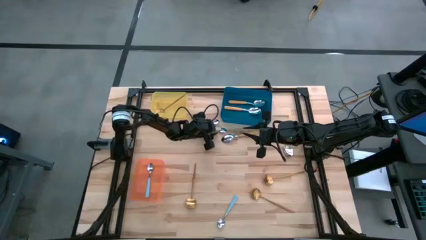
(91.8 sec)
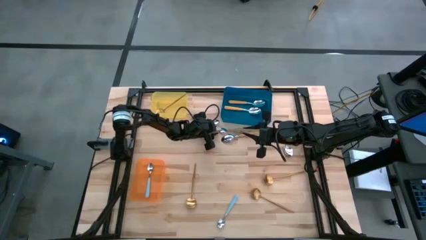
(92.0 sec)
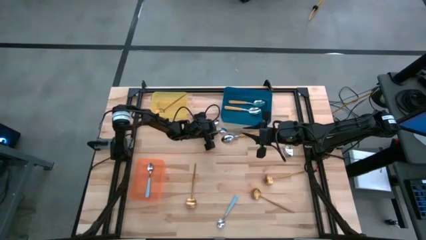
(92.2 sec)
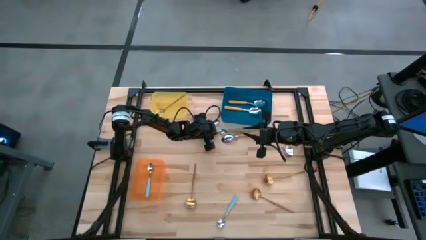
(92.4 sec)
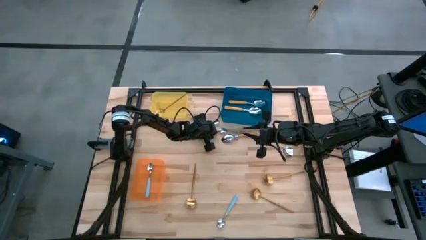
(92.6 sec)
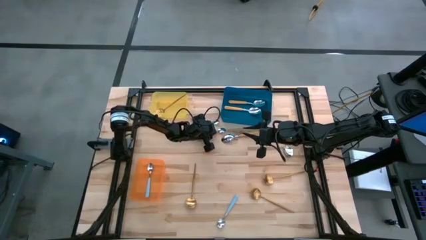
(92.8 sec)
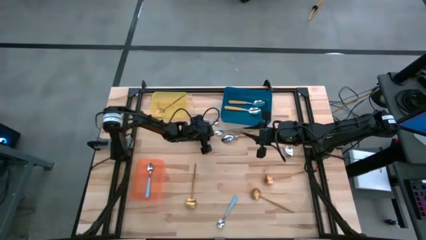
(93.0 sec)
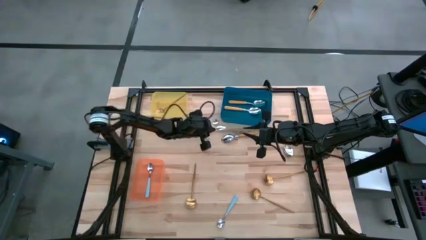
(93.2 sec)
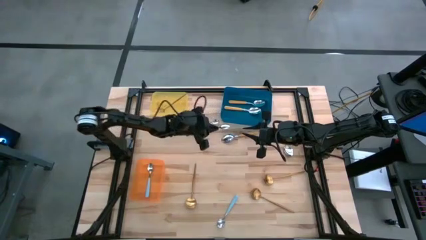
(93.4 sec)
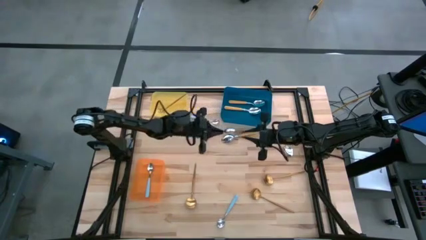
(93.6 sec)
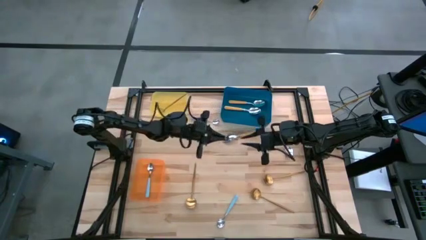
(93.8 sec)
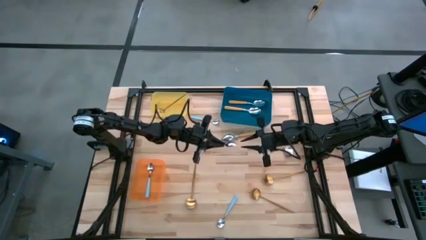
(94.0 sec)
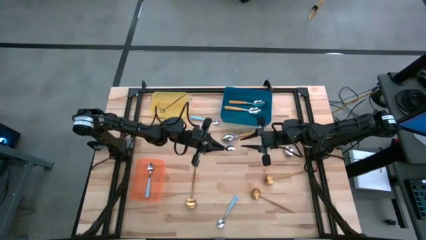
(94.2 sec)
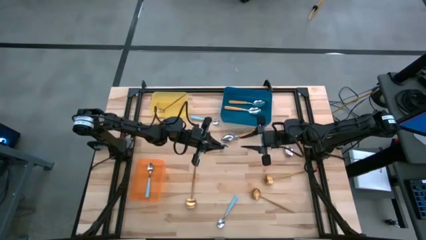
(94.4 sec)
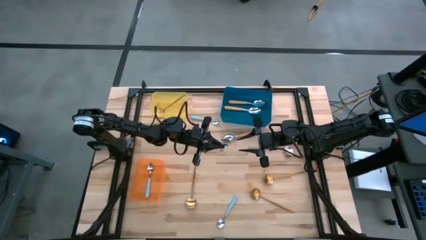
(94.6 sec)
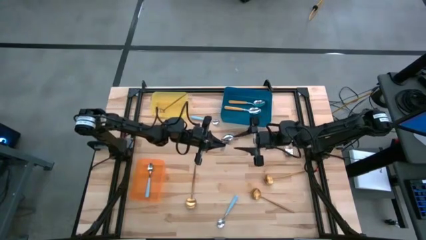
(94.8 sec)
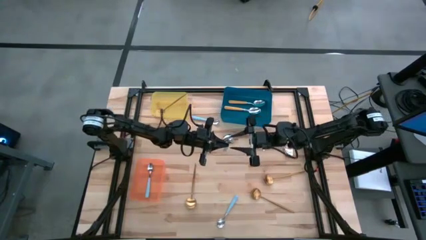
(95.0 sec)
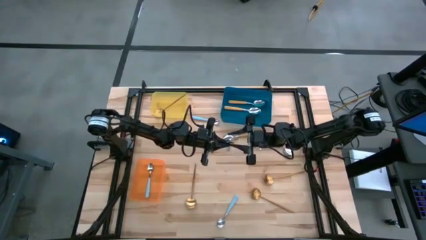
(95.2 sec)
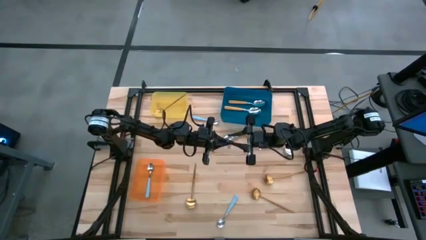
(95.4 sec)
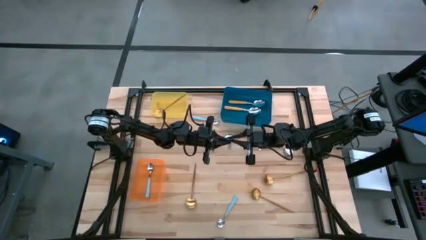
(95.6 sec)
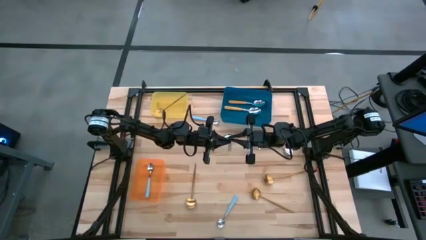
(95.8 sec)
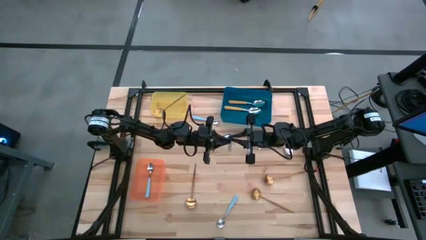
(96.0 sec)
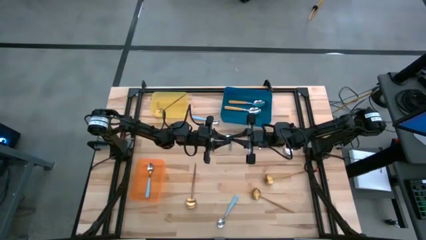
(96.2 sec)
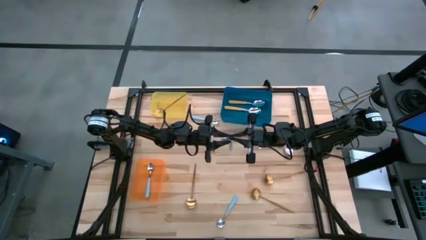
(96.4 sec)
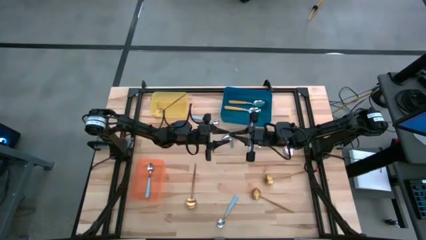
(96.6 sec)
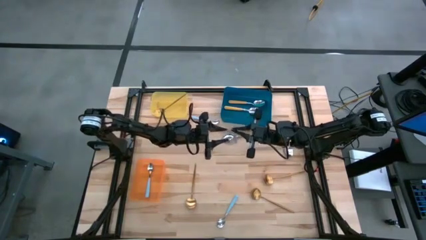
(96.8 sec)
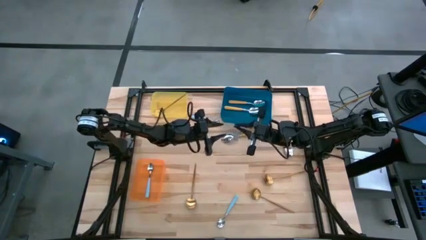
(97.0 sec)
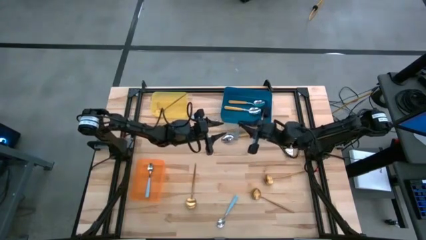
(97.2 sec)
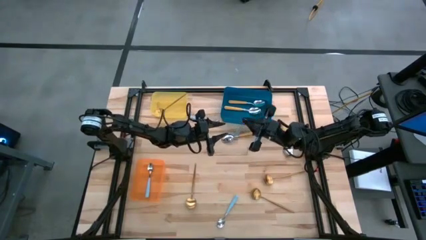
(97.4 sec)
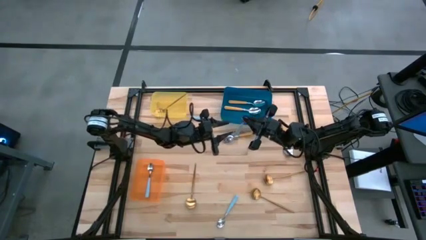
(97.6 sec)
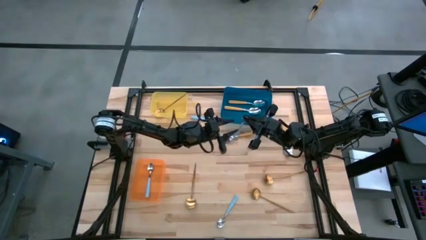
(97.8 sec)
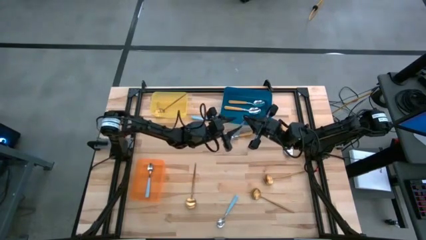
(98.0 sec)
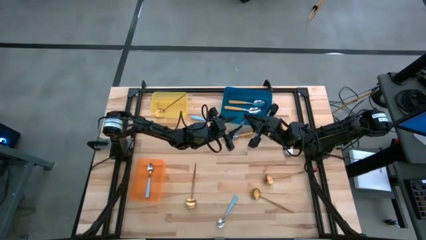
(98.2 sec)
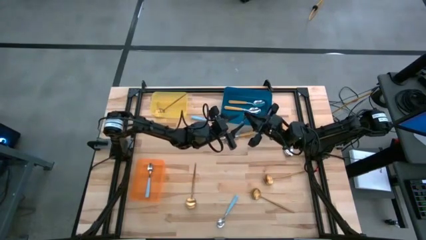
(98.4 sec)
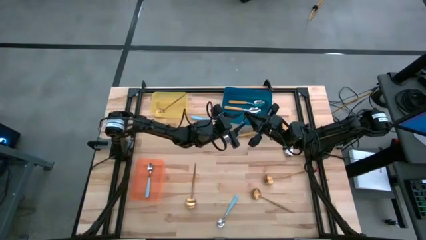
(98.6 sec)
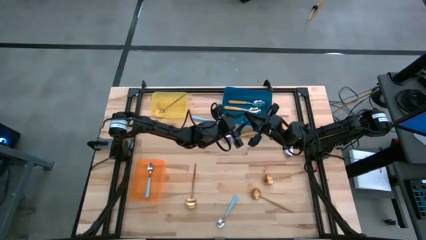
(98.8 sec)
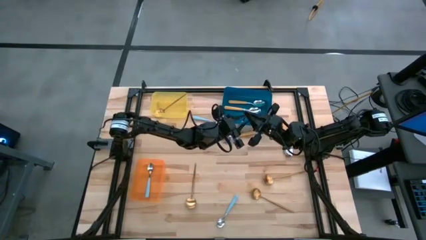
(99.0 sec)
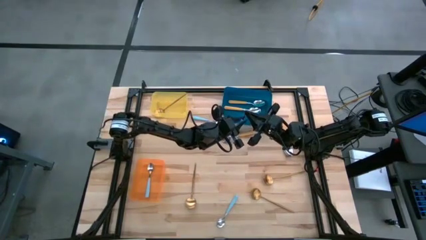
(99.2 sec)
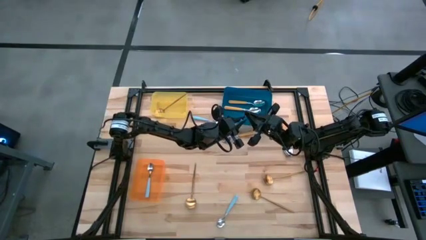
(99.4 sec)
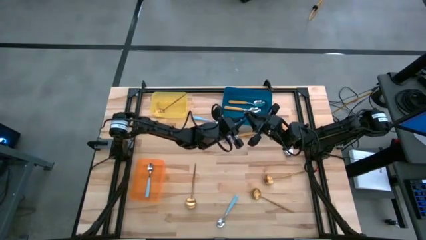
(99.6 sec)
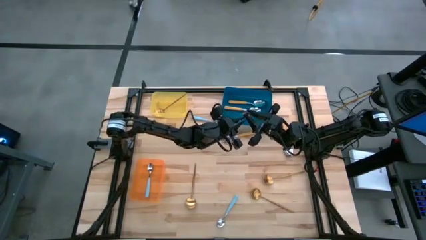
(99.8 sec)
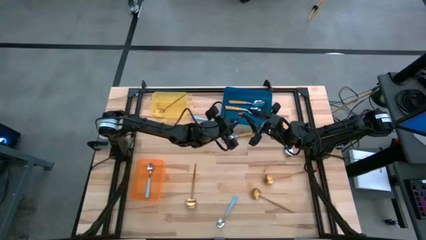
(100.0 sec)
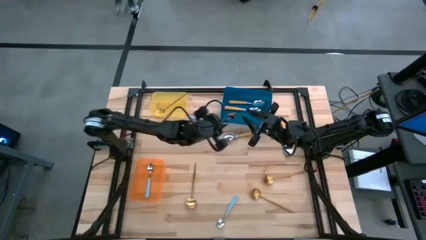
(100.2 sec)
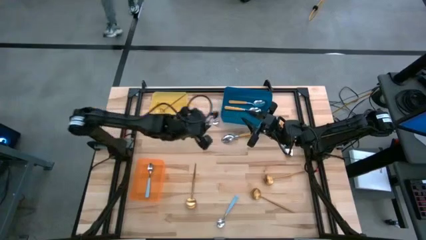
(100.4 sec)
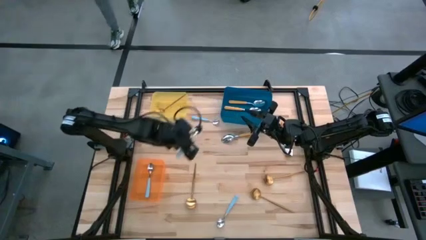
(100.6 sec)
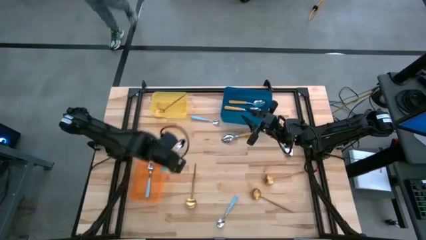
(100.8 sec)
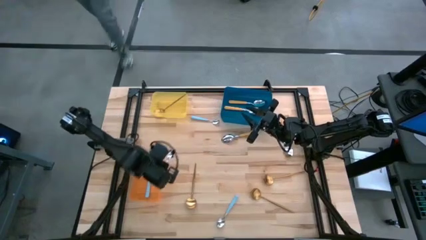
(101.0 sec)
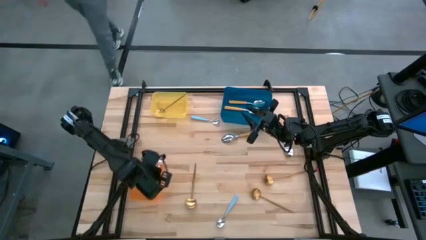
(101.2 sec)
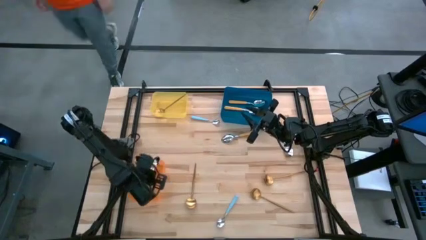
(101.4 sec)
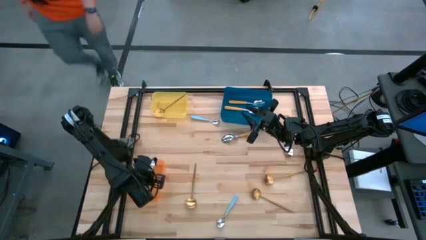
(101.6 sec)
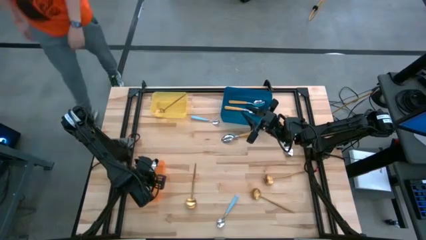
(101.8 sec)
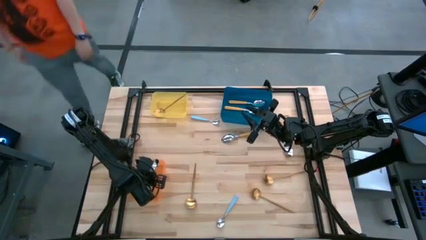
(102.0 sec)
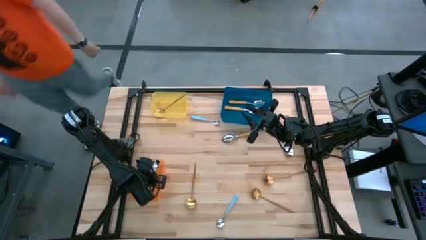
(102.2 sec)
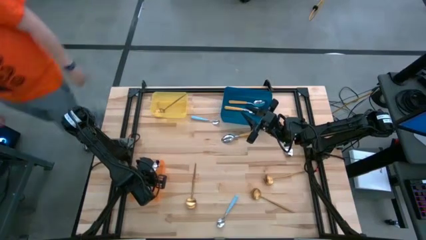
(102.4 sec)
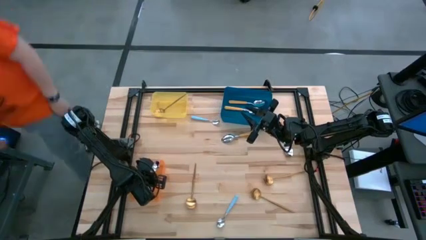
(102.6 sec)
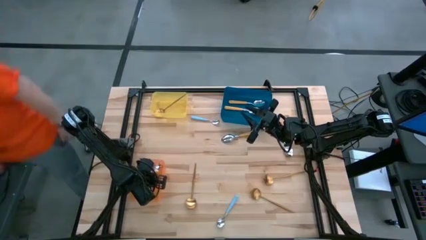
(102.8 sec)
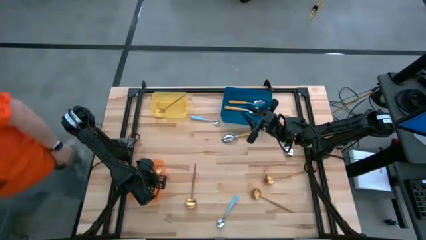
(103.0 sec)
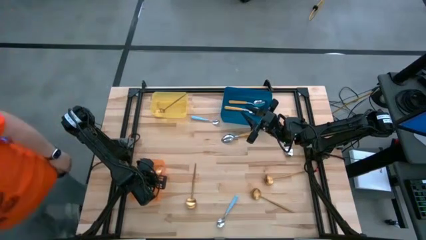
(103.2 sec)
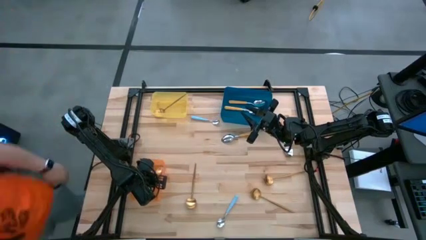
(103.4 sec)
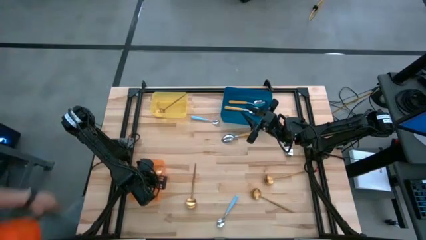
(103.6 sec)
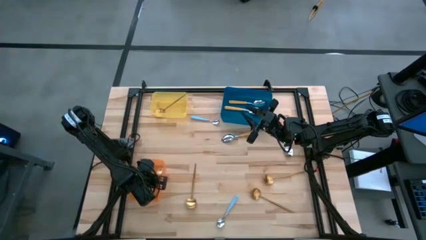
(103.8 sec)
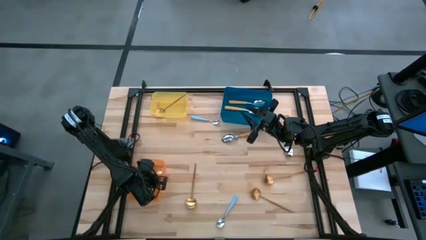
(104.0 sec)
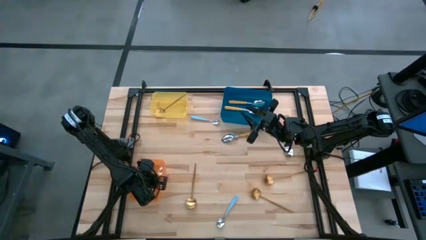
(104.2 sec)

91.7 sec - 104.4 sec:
Task: Sort silverware by color (type)
Put the blue spoon into the orange bin

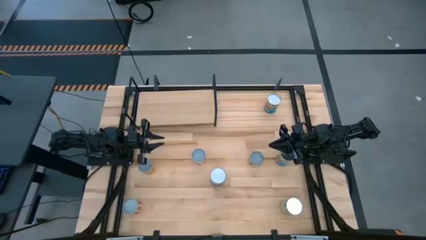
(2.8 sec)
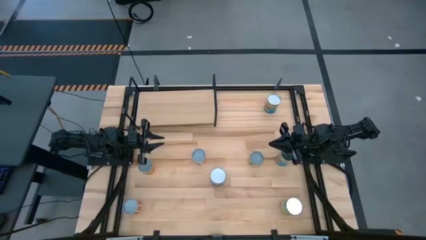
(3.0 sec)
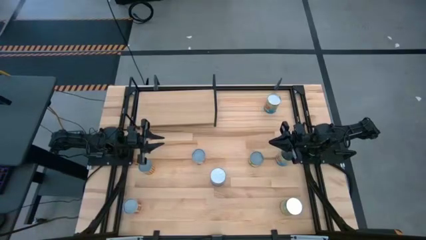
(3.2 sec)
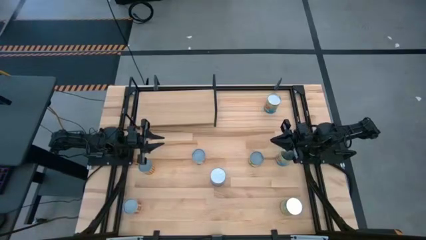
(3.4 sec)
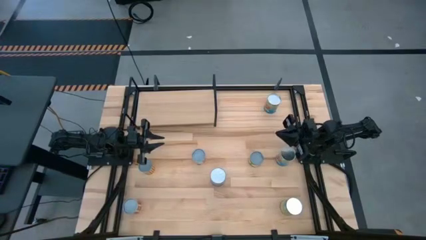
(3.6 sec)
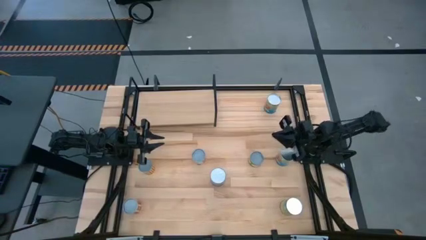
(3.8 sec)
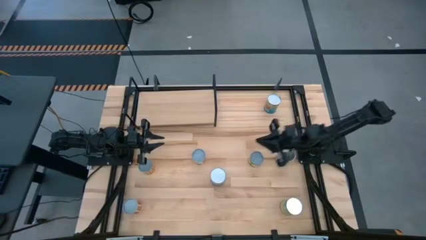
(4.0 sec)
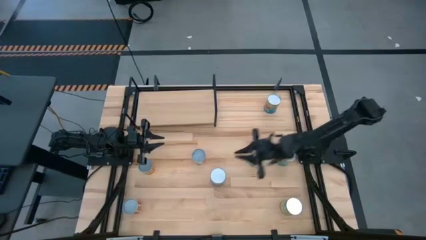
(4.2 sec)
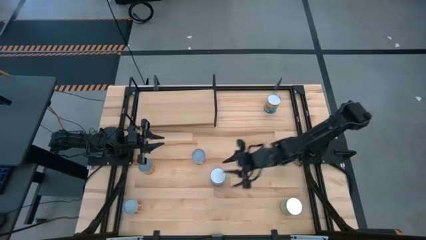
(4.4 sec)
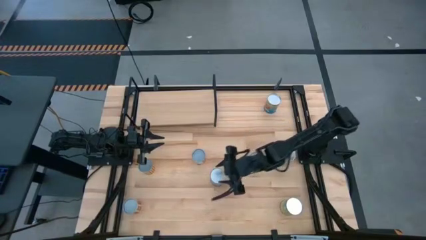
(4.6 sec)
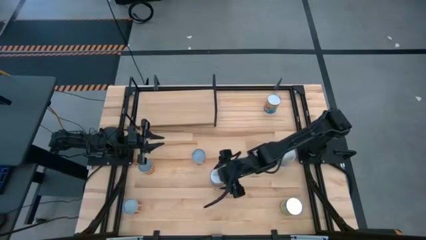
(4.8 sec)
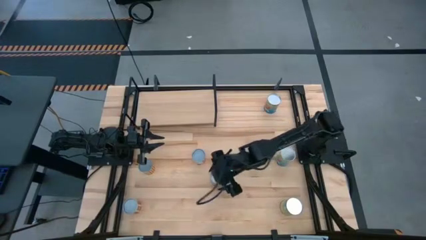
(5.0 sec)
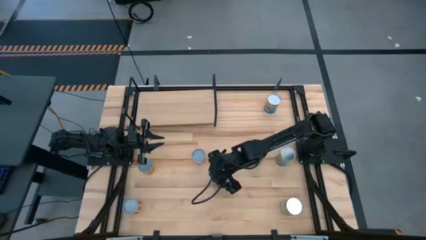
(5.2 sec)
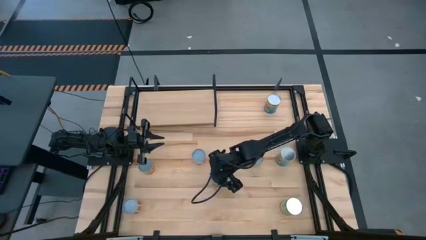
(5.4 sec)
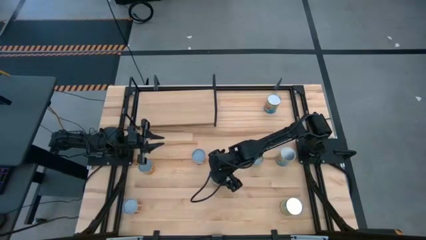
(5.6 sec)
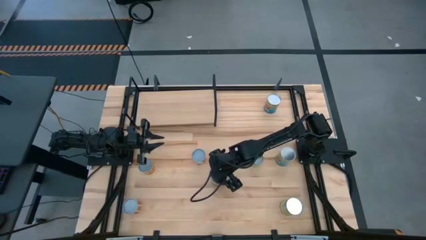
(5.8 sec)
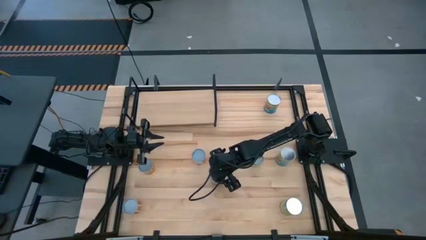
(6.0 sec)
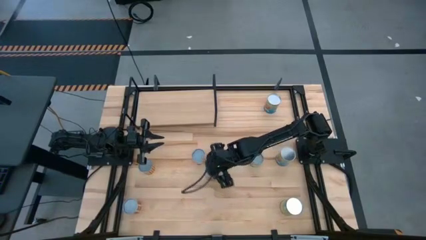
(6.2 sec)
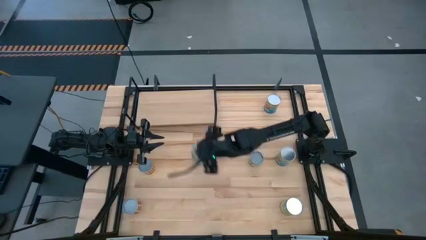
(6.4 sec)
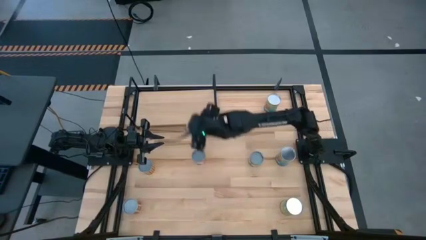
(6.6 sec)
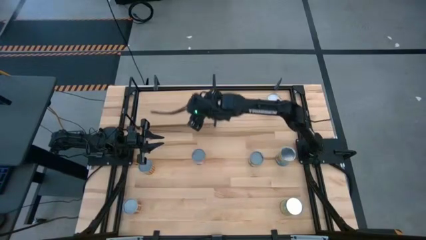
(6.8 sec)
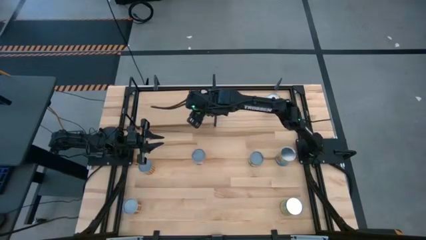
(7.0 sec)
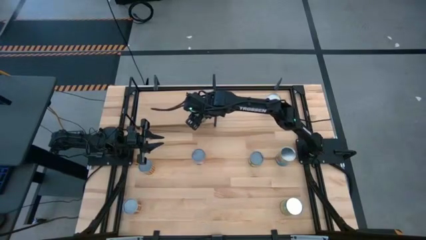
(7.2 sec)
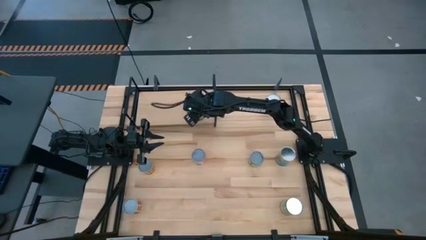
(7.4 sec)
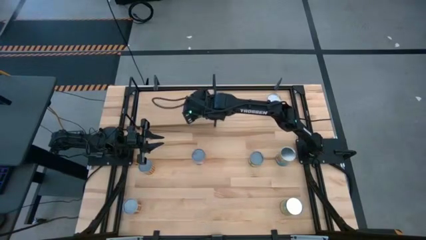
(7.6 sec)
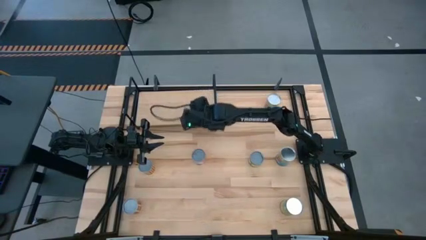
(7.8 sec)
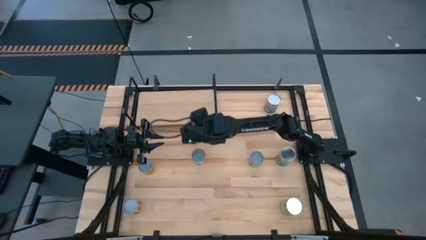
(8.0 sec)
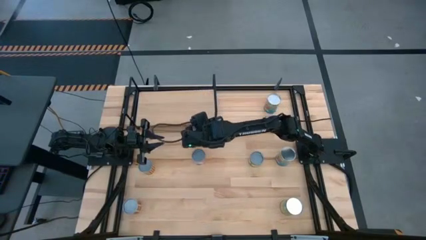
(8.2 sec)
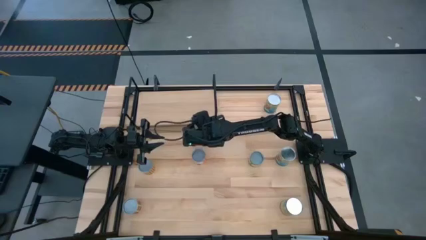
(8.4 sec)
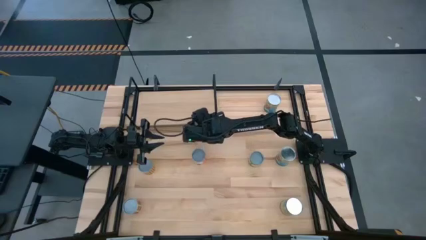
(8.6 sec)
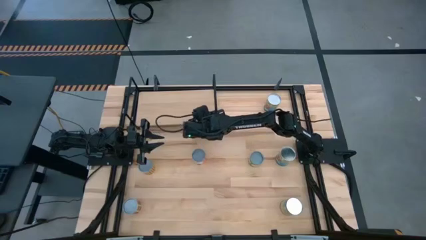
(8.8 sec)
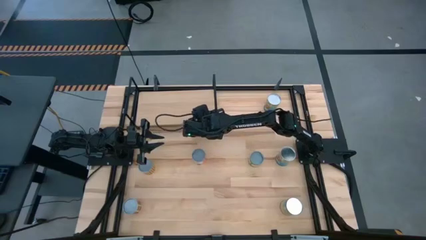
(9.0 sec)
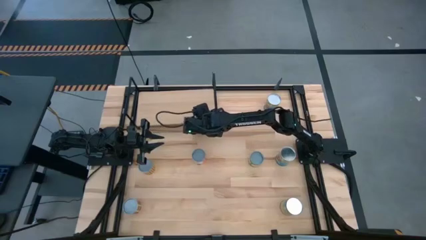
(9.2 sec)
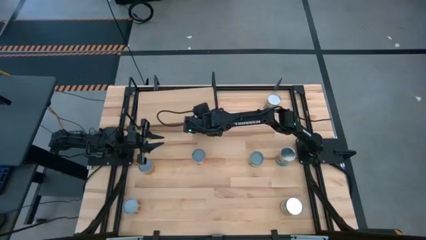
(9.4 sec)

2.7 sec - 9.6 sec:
Task: Pick and place cans onto a shelf
Put the canned peas on the shelf
